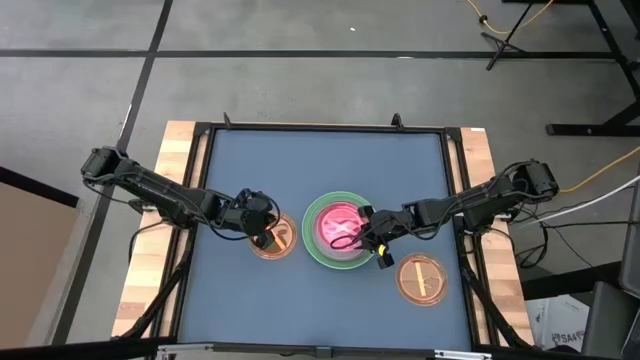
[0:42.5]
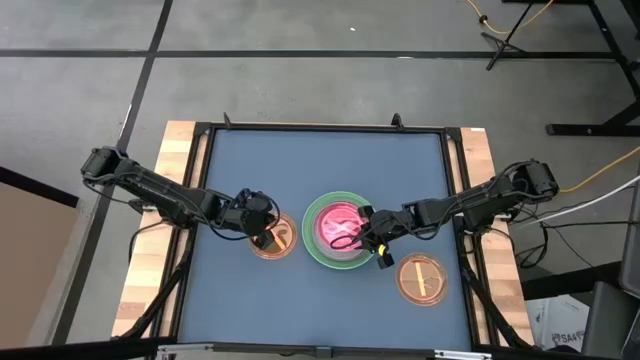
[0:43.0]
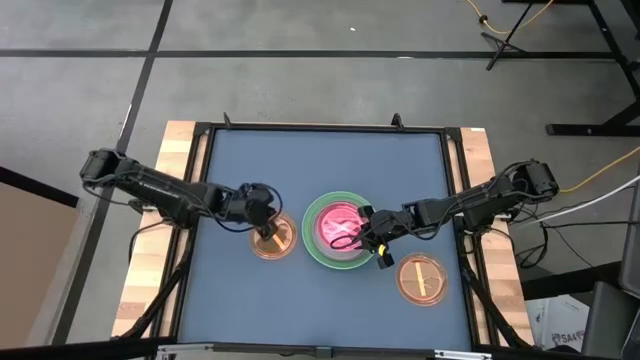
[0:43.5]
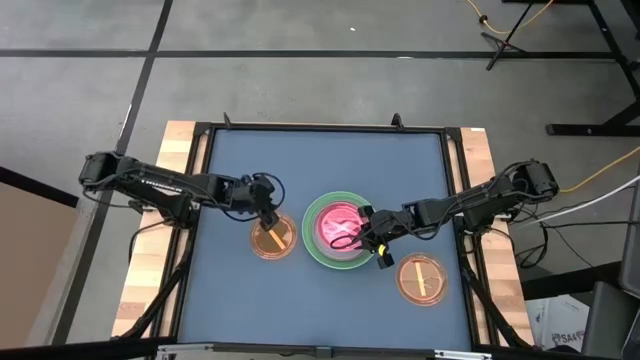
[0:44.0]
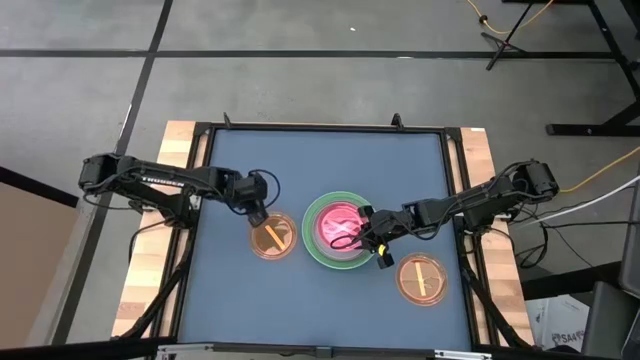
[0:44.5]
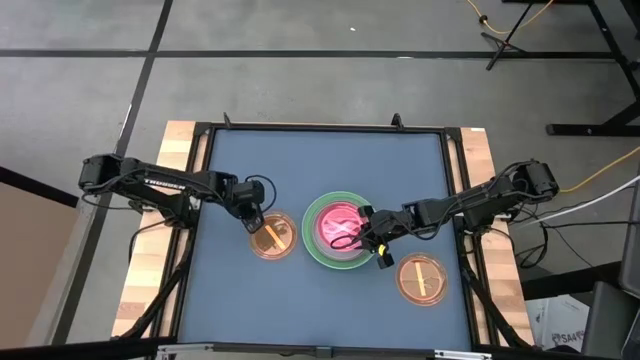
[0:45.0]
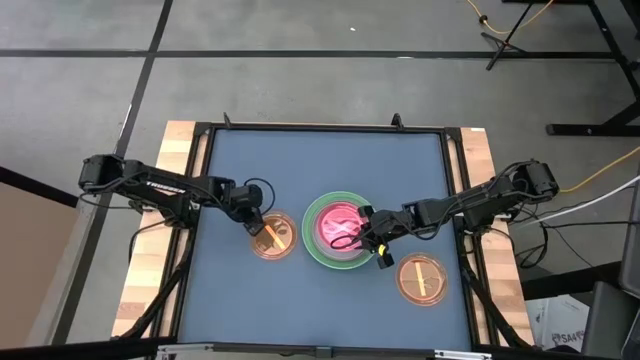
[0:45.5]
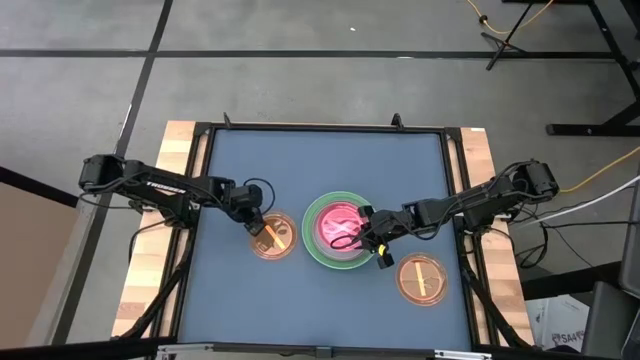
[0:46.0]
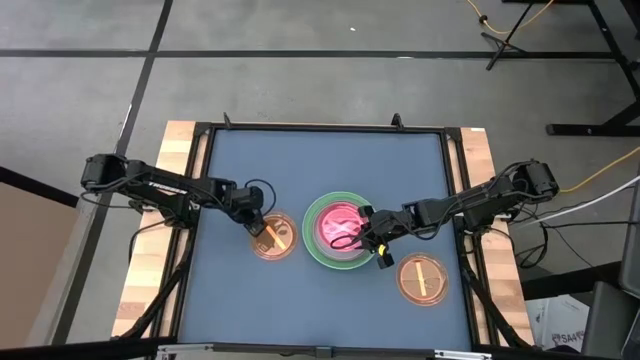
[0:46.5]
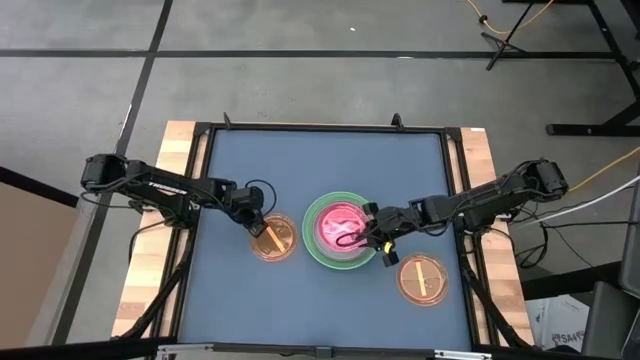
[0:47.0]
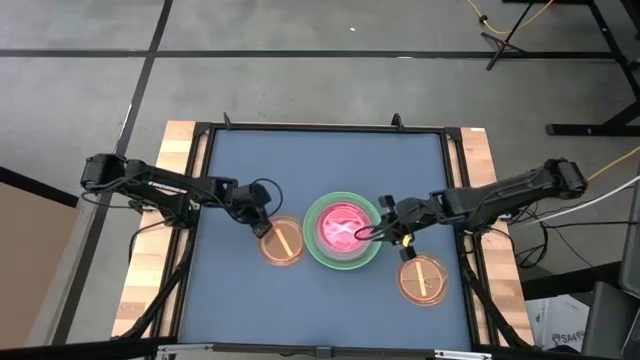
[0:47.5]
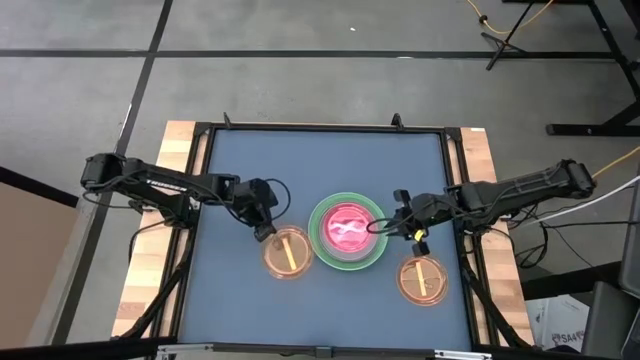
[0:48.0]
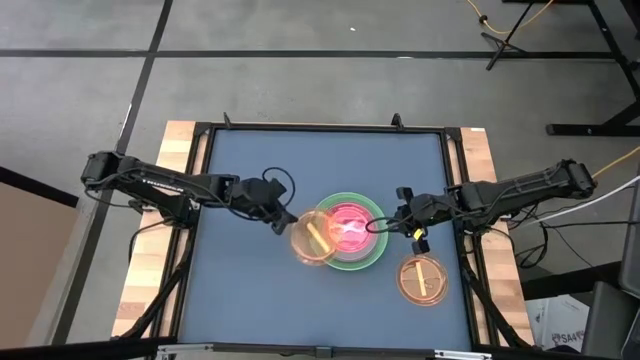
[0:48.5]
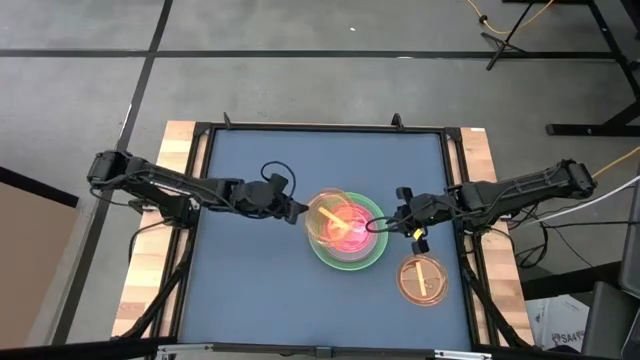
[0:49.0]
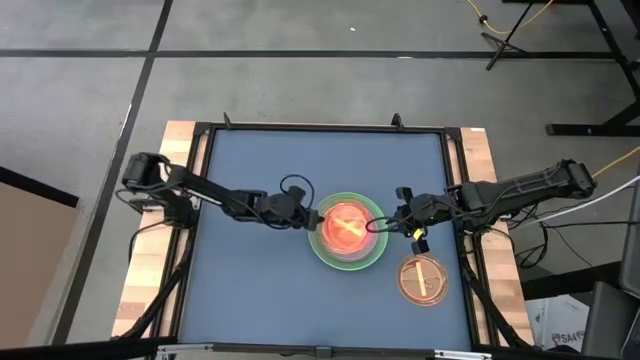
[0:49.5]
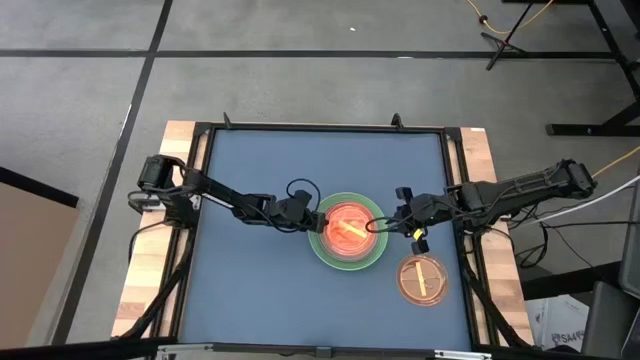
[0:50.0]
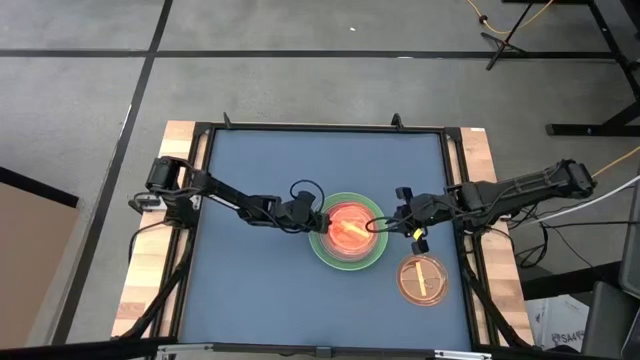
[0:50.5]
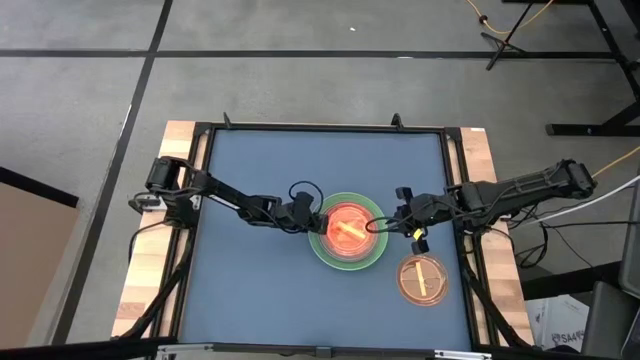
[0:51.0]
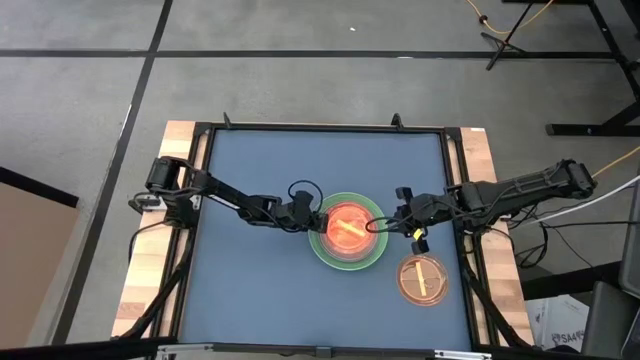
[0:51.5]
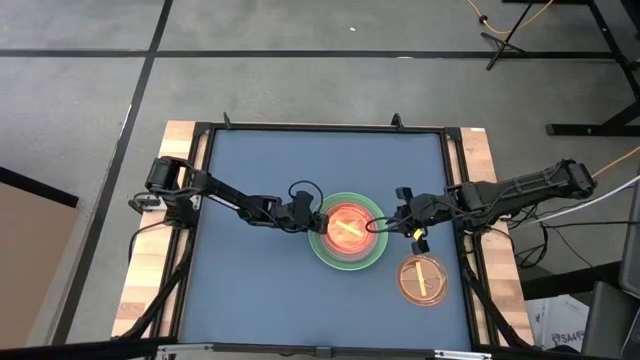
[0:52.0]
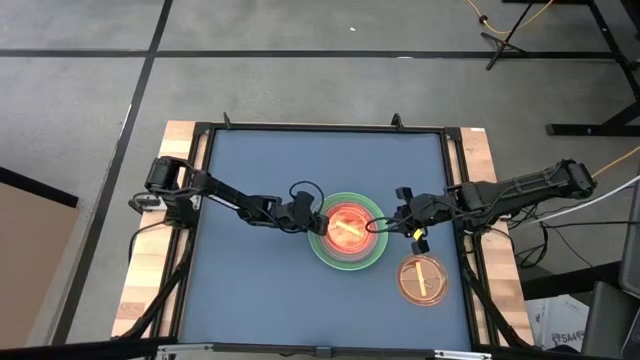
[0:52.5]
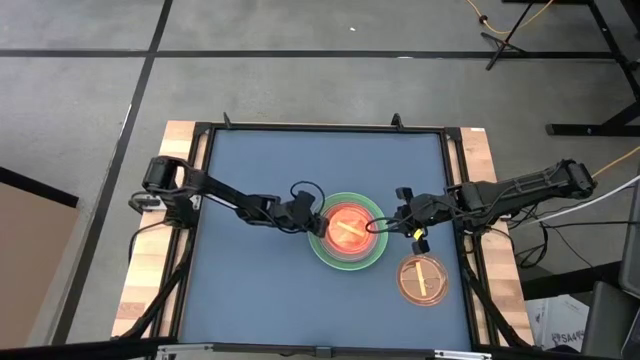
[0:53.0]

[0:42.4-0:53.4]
Task: Stack plastic plates
Stack the left light orange plate on top of the light pink plate

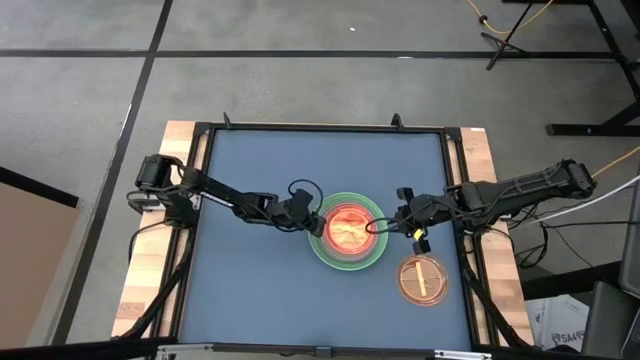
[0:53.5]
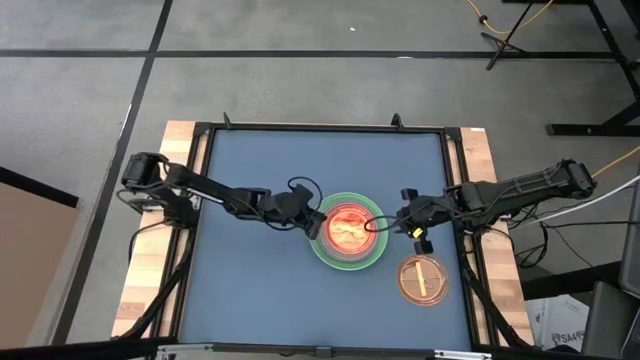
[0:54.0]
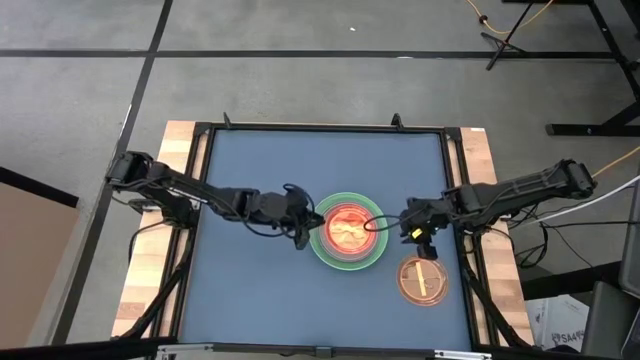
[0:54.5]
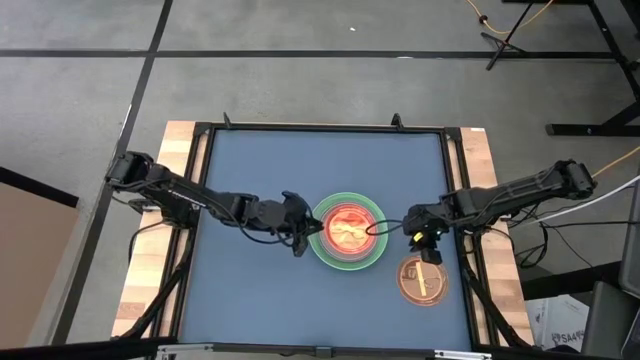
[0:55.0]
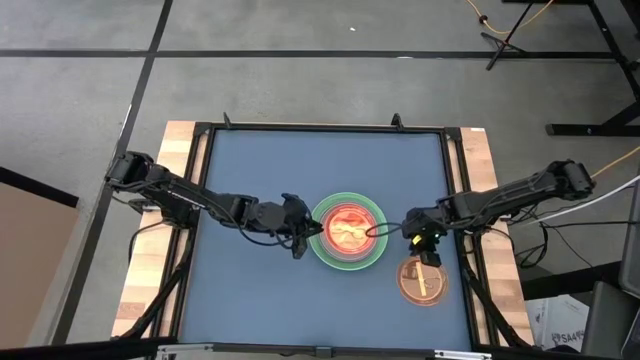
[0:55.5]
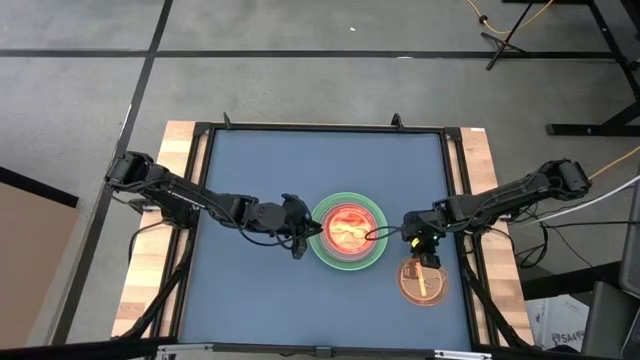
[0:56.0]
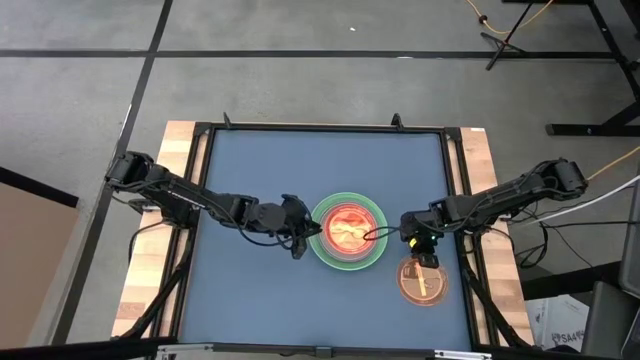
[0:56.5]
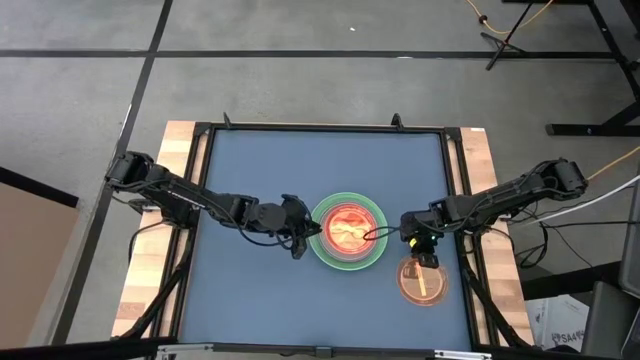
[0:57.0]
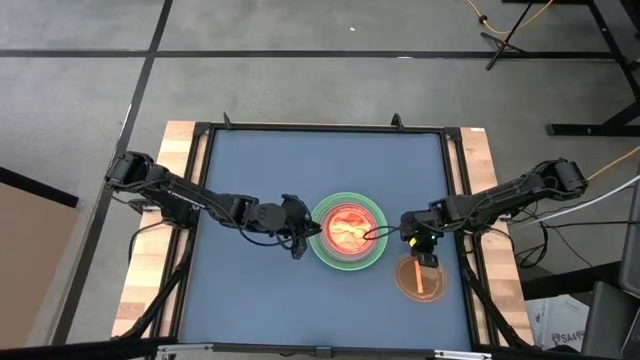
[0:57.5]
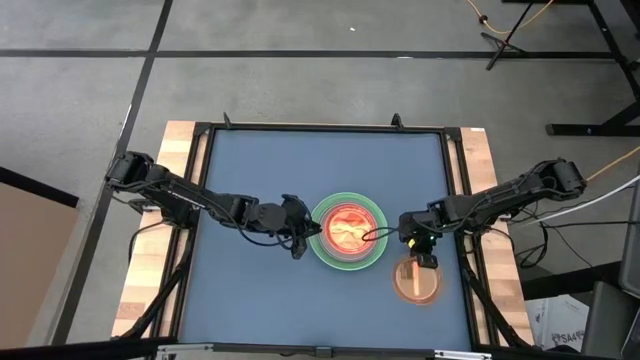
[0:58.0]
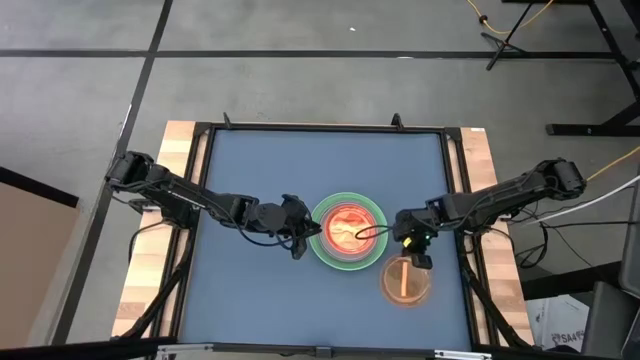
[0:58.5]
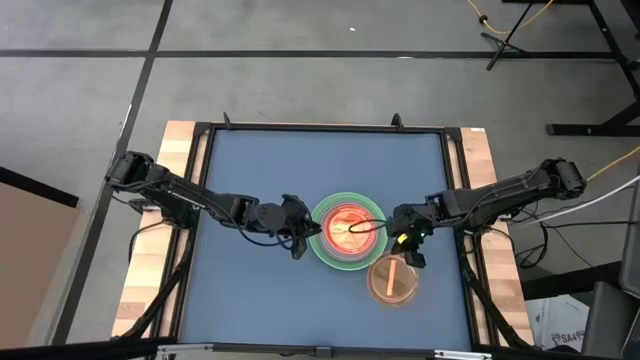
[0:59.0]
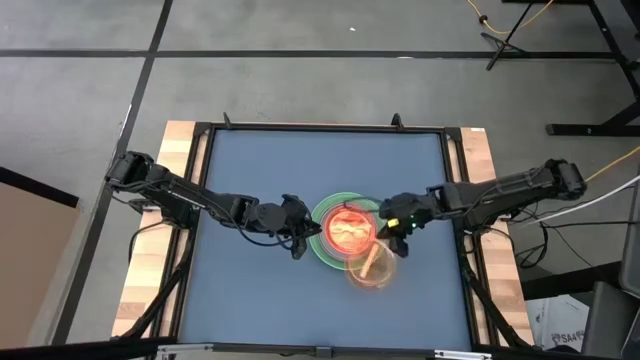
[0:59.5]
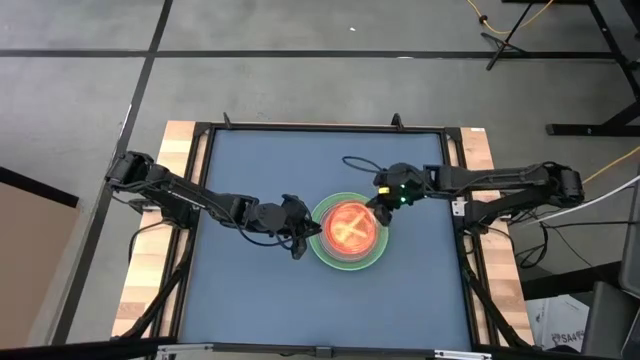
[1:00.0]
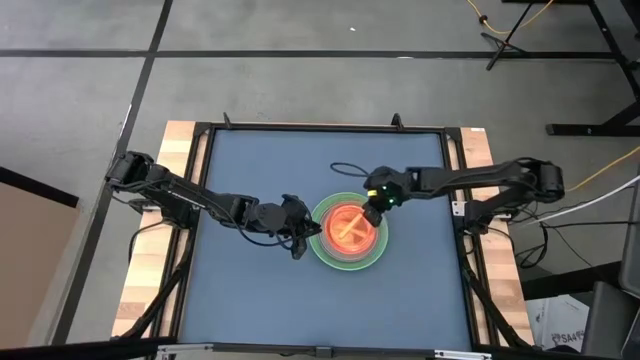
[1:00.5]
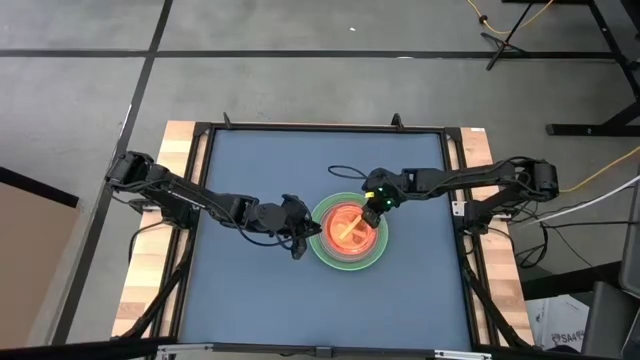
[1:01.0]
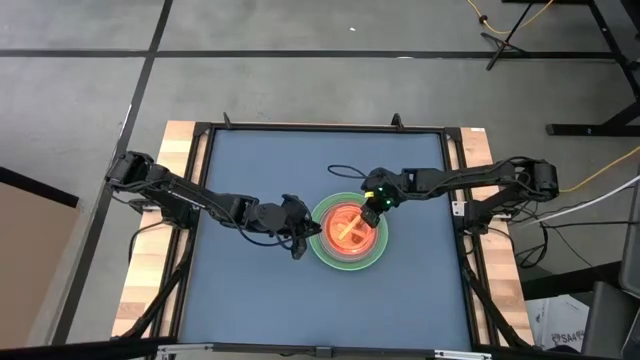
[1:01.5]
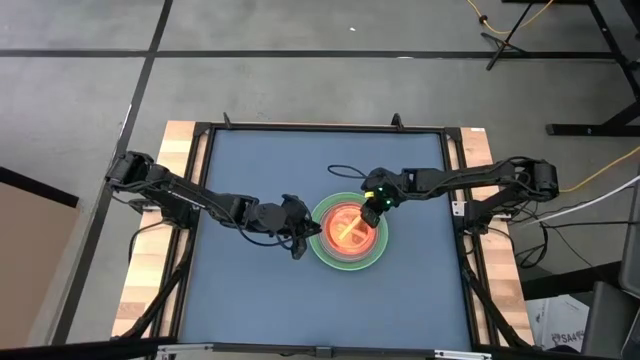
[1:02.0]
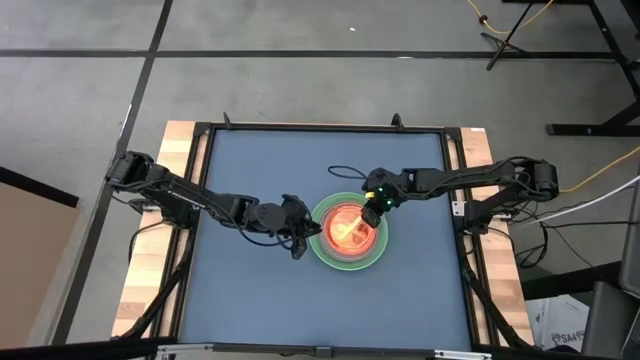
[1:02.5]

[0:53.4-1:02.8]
Stack the light orange plate on top of the light orange plate

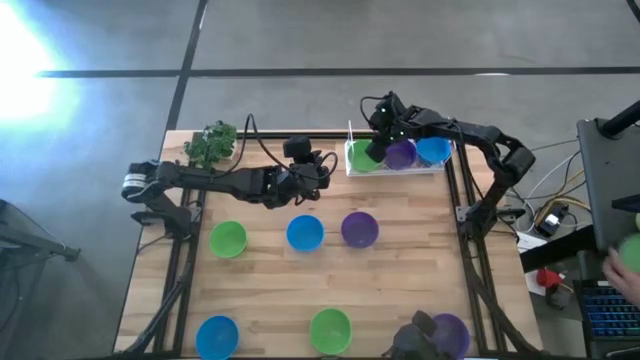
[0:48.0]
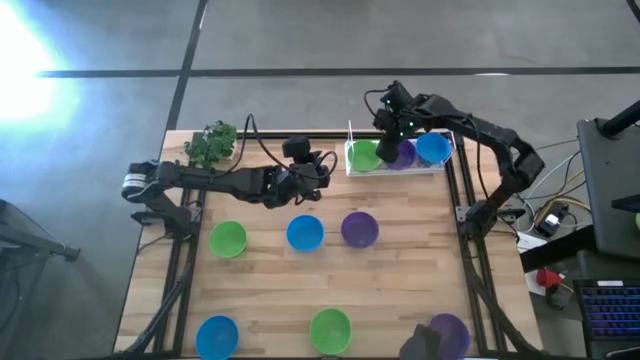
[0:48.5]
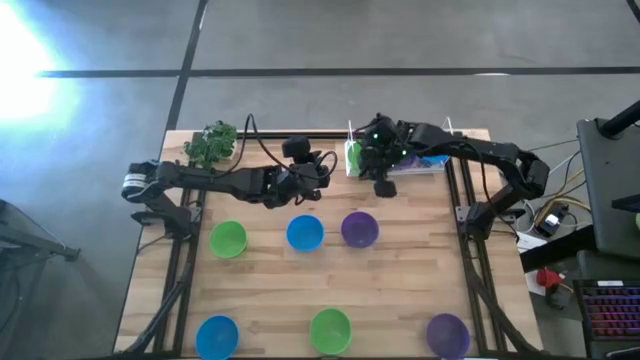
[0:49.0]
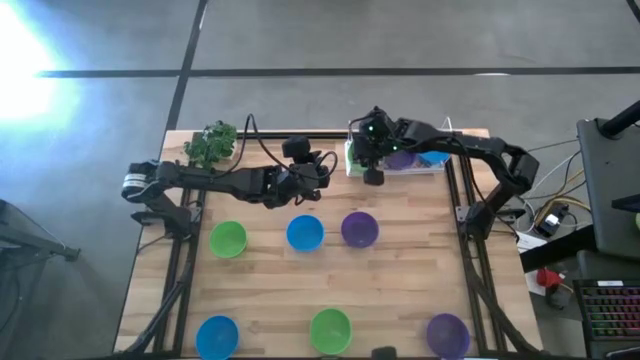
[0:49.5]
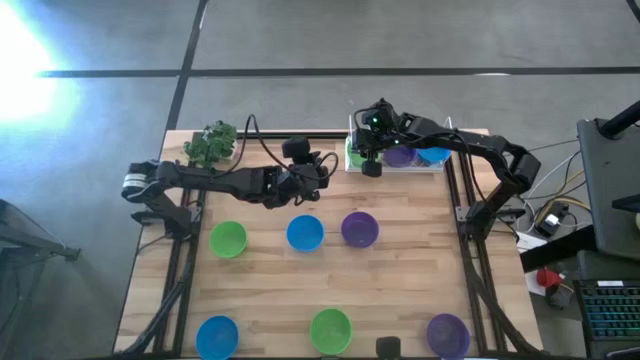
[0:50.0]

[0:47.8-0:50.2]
Task: Pick & Place Mini bowls
Adjust the shelf on the table
